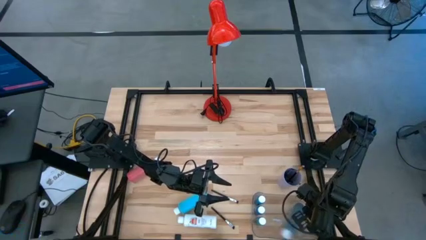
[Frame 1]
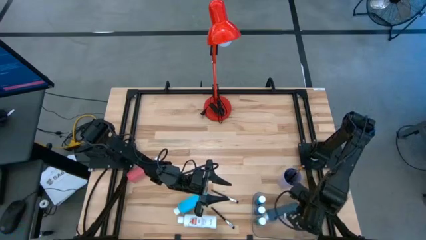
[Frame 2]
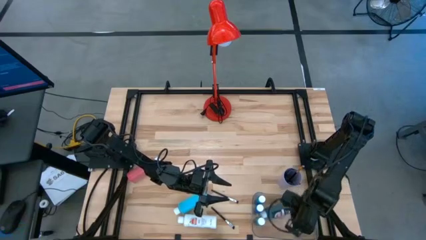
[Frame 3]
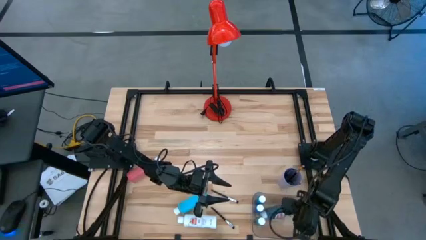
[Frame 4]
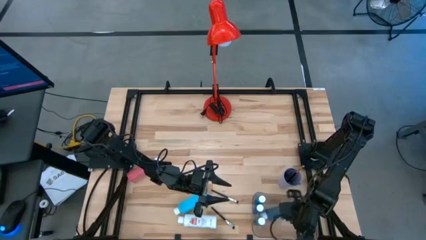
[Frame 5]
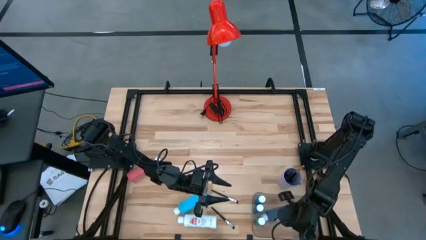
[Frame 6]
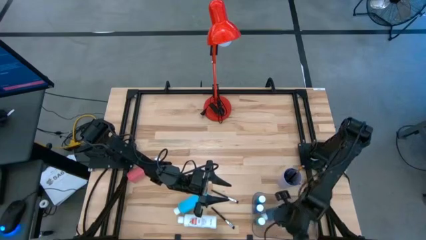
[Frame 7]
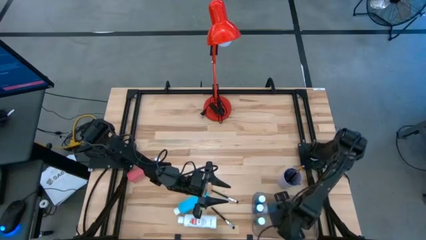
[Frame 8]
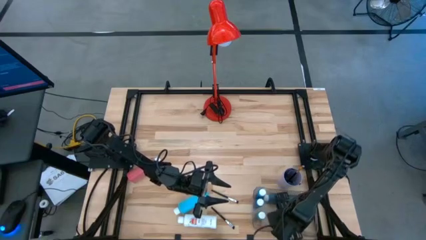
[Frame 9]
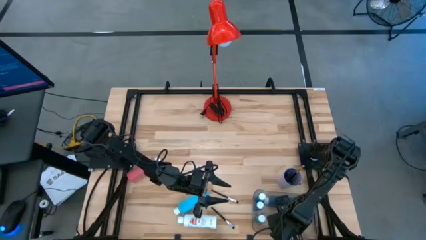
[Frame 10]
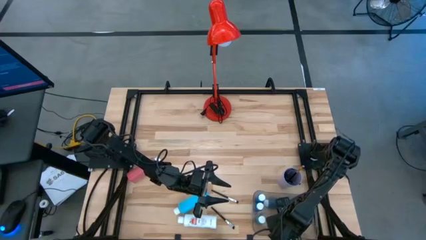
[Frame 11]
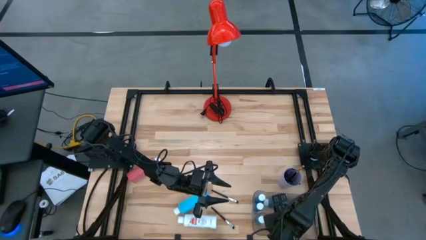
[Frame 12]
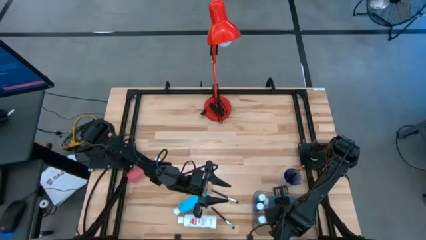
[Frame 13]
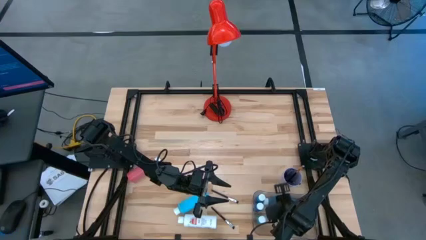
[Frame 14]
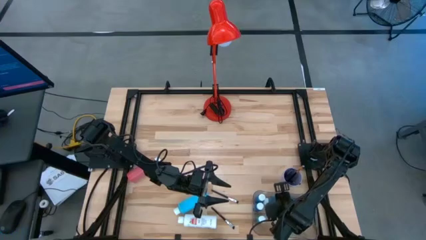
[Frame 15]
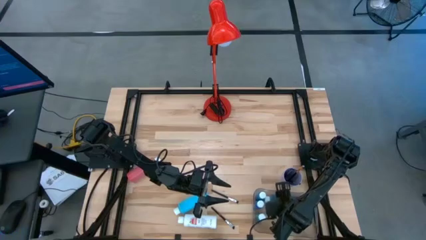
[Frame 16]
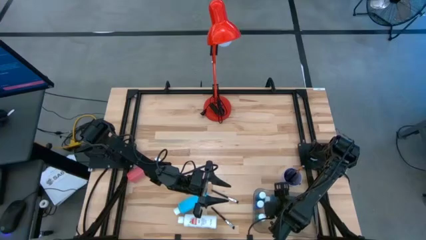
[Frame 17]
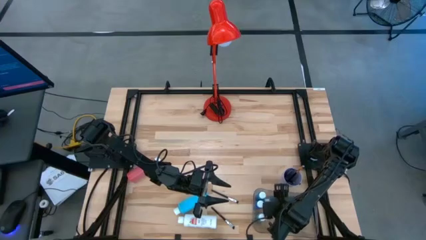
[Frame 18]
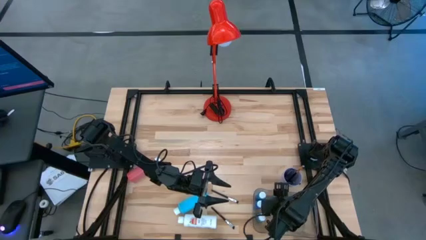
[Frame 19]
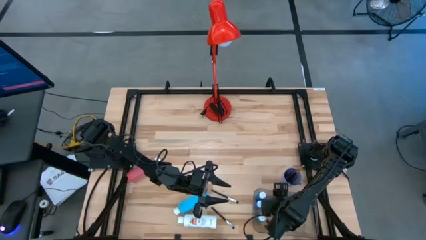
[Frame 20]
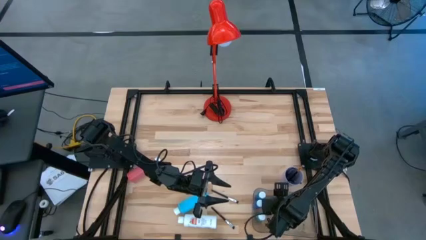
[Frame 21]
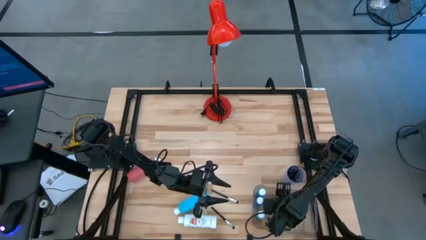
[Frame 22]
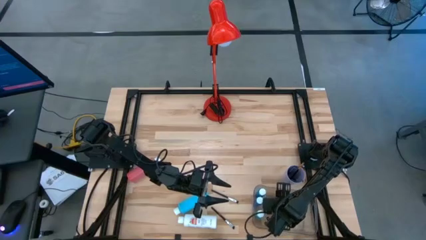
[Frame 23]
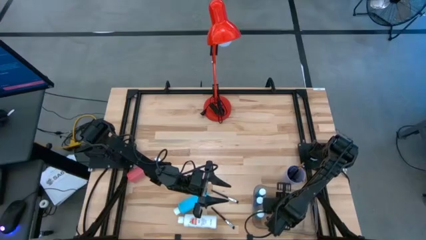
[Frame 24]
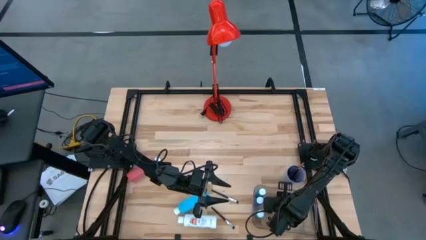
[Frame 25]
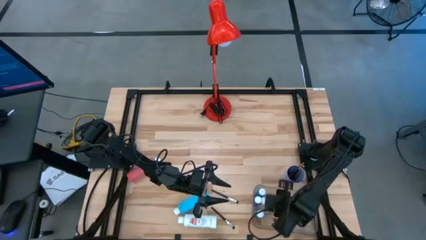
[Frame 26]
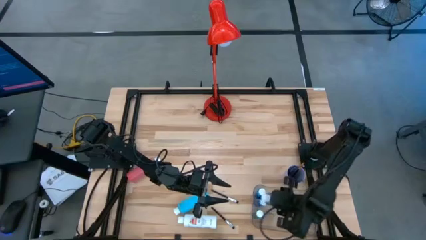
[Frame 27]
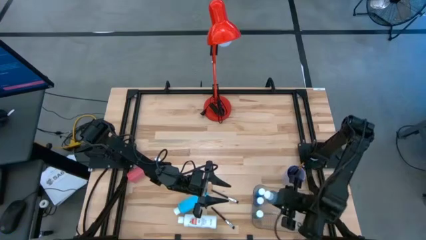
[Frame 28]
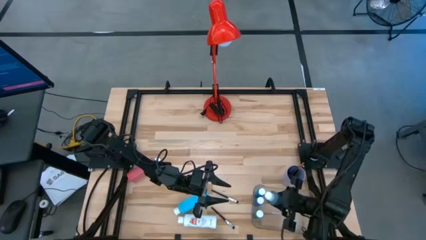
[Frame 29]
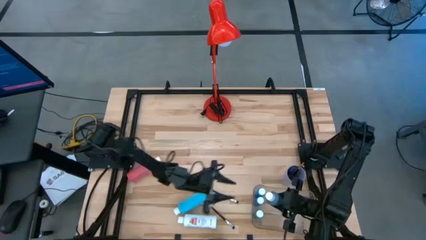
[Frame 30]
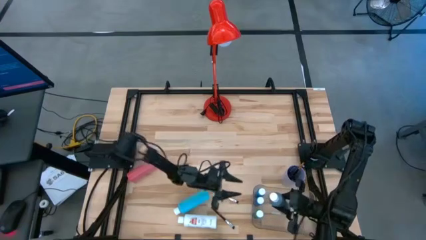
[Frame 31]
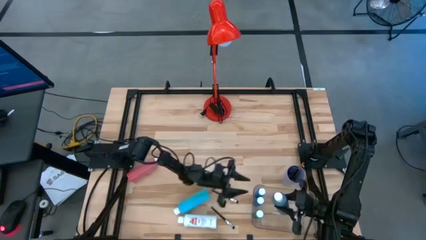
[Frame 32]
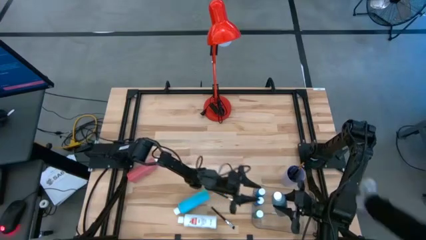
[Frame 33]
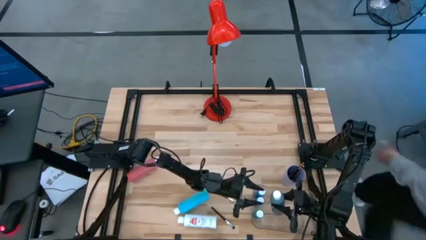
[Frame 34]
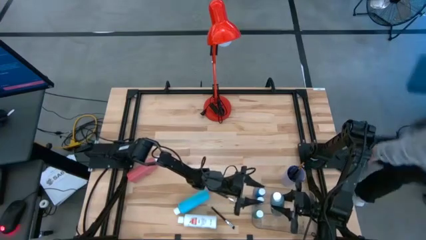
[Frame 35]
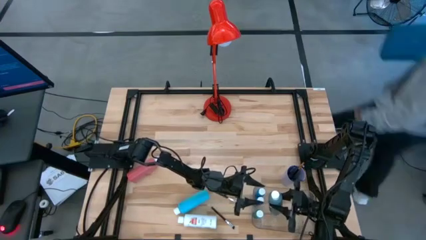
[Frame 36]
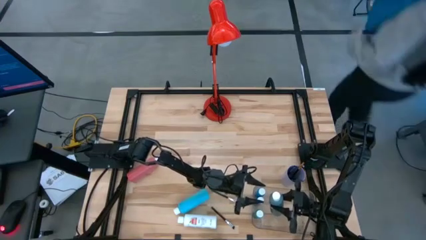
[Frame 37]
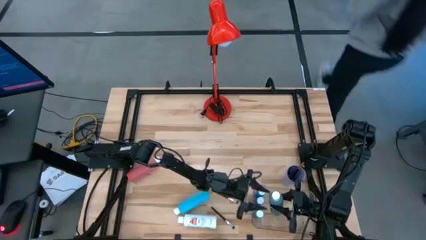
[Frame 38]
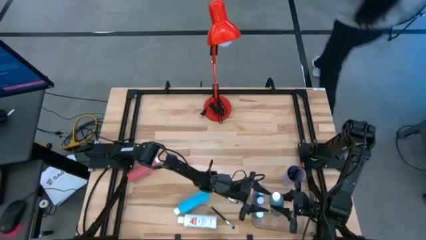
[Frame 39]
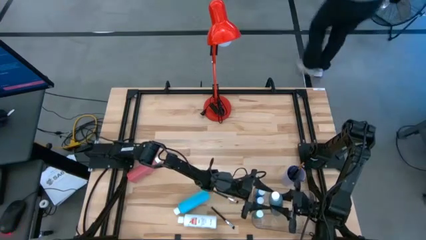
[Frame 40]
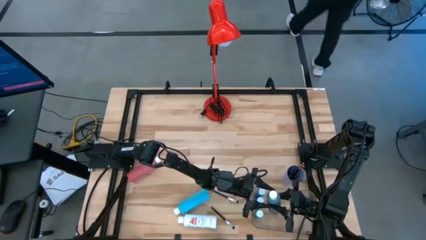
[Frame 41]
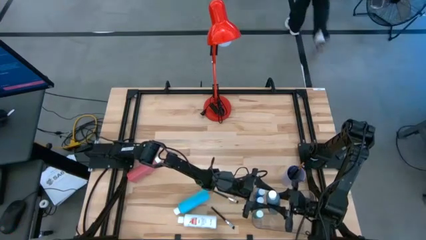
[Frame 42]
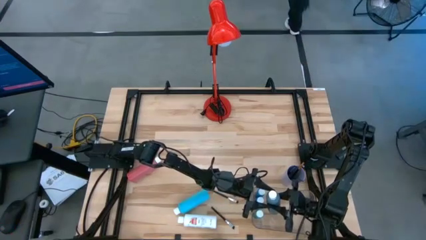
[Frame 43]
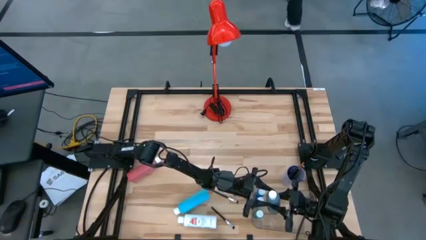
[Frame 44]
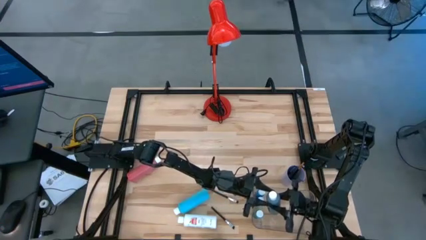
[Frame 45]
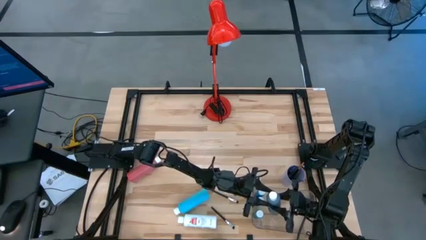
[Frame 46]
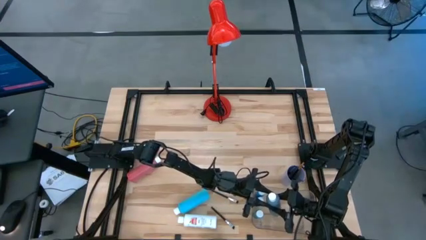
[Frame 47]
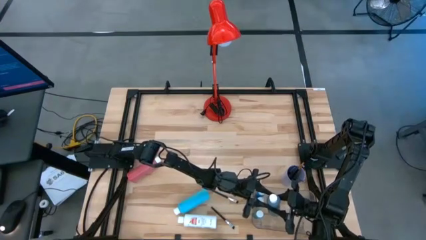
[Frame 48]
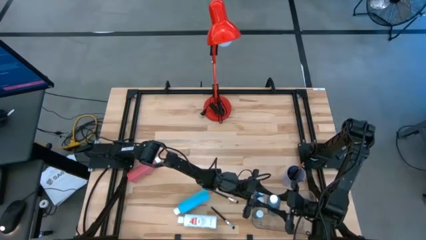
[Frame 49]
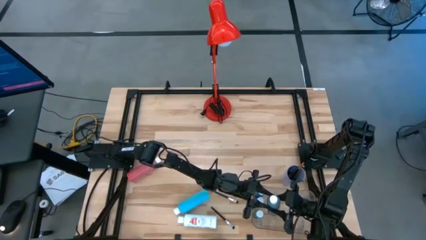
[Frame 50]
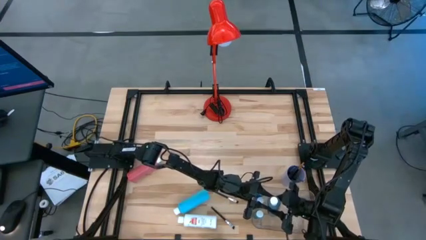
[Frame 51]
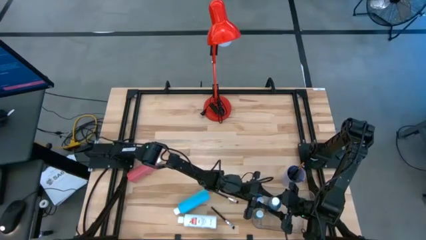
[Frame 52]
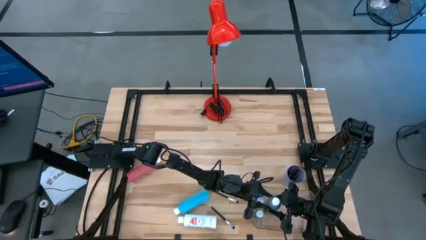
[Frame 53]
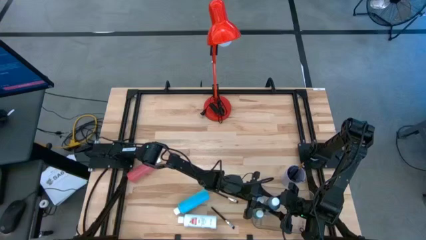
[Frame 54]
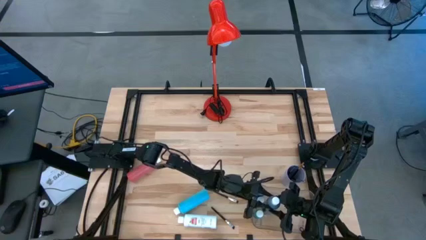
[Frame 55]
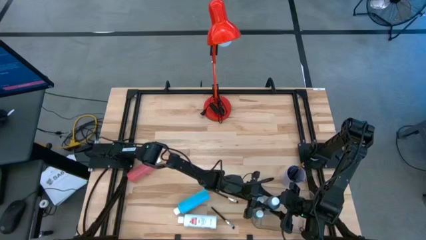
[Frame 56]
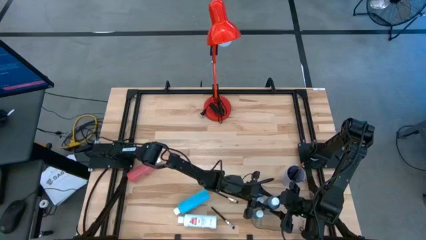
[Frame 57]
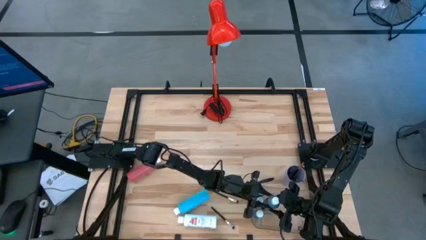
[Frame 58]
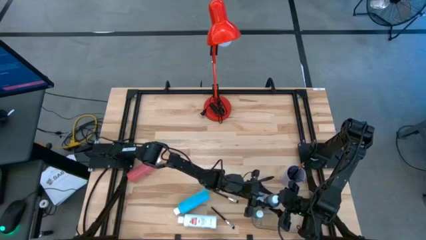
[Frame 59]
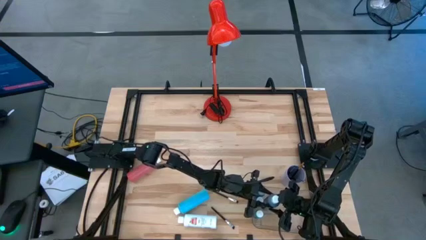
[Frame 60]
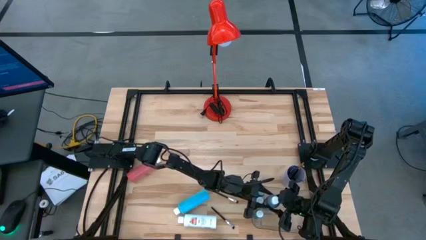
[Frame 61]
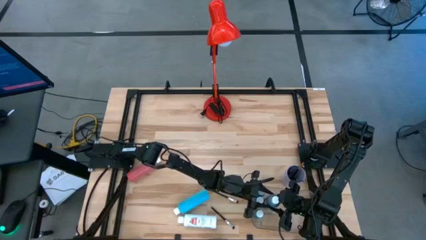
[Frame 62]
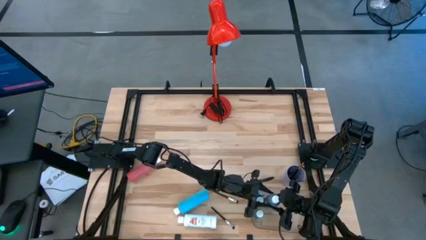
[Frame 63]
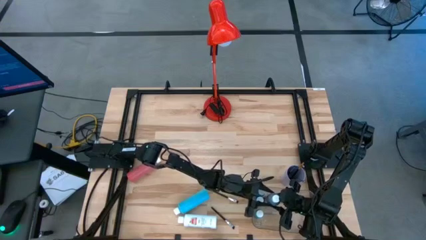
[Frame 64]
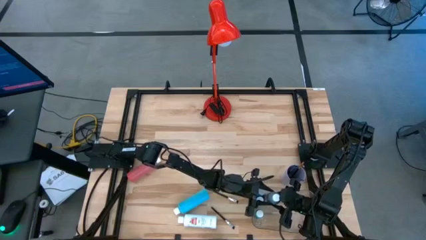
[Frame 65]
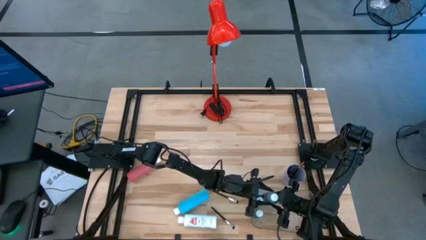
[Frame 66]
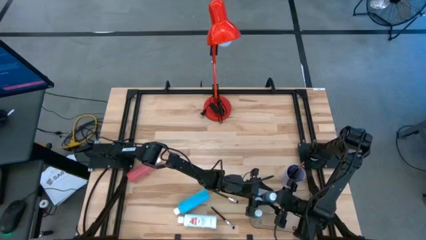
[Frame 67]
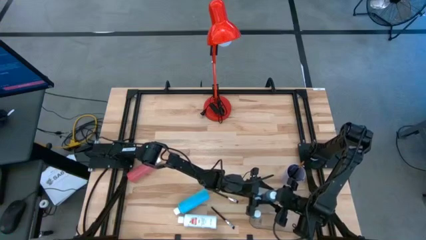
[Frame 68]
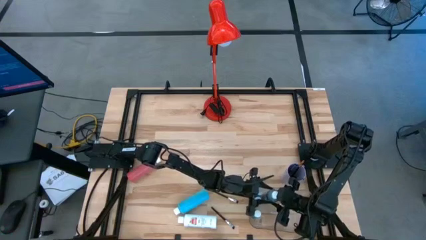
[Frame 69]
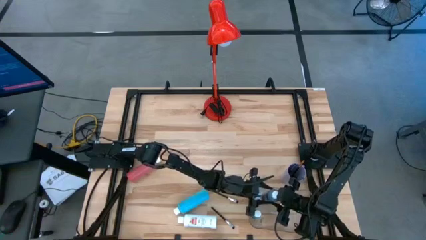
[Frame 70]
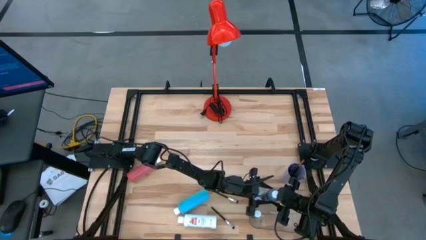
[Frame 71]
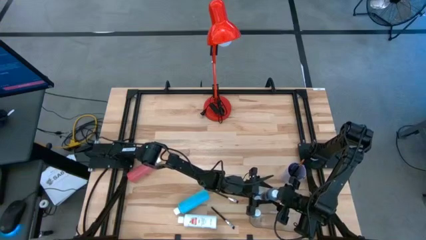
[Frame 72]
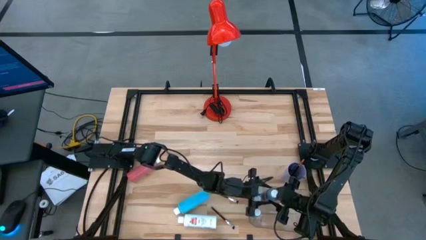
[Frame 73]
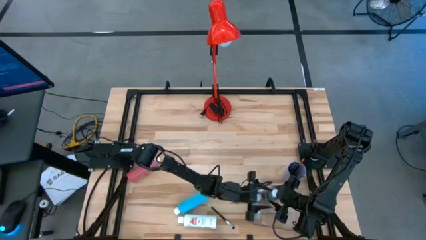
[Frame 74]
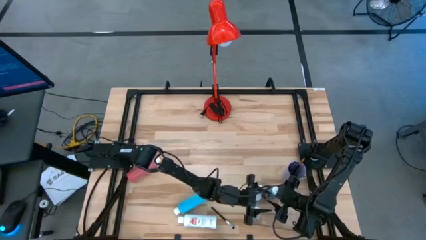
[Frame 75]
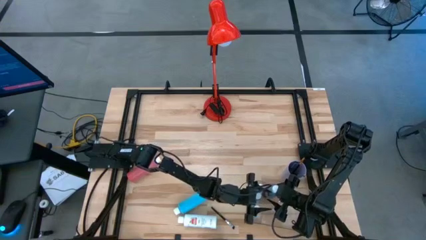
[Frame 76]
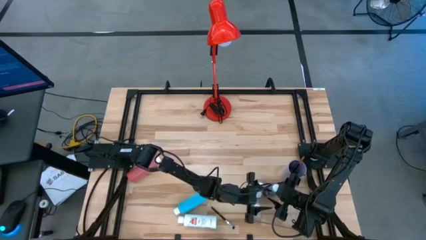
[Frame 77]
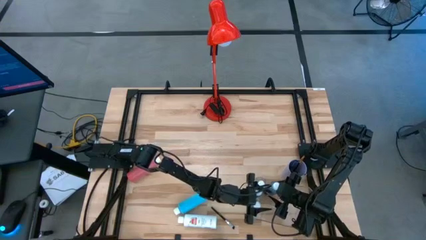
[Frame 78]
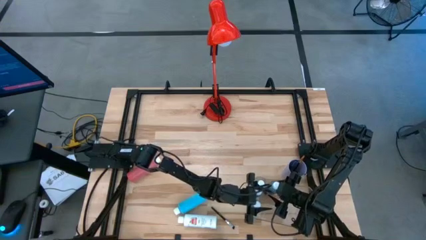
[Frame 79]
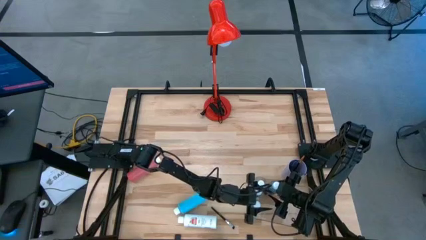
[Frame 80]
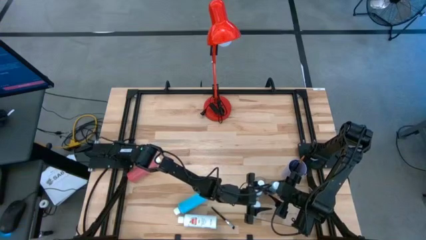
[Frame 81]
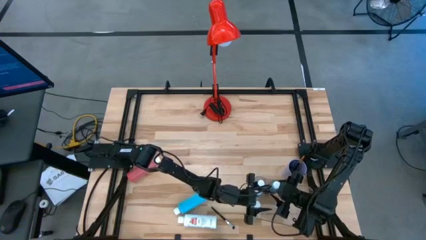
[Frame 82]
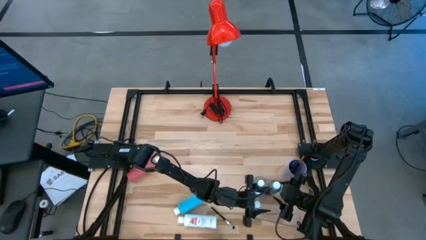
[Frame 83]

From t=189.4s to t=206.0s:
Task: Pick & Place Paint Supplies
Adjust the black paint bottle in the transparent bin
